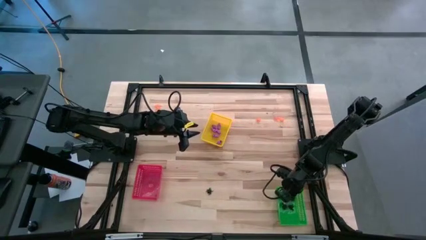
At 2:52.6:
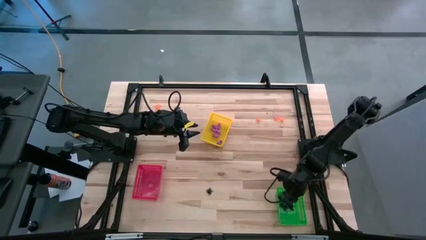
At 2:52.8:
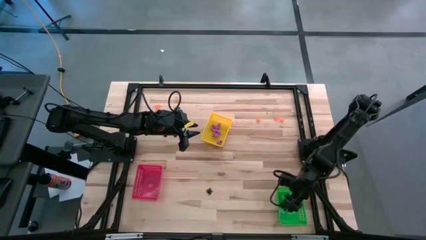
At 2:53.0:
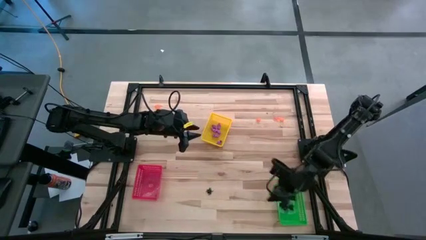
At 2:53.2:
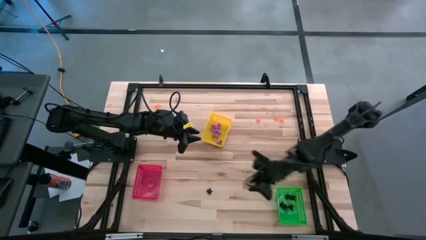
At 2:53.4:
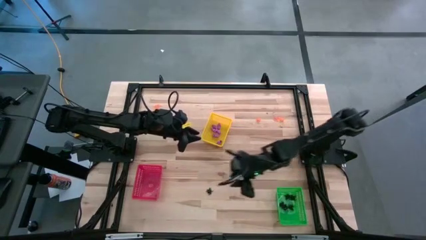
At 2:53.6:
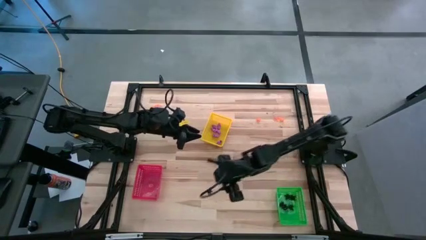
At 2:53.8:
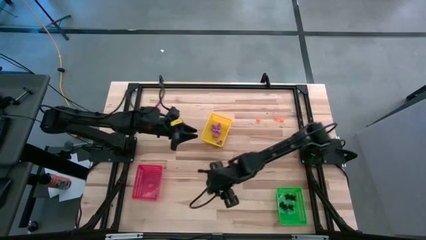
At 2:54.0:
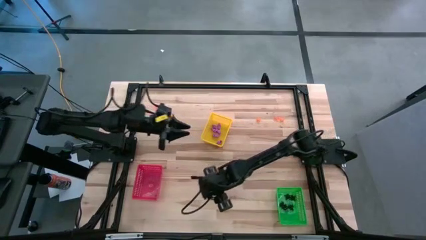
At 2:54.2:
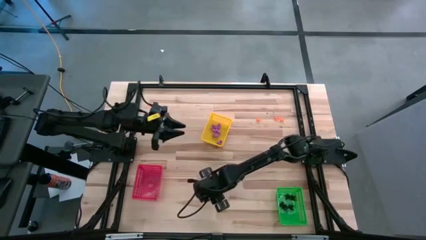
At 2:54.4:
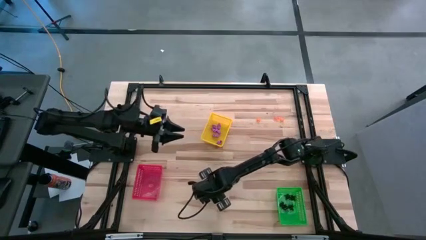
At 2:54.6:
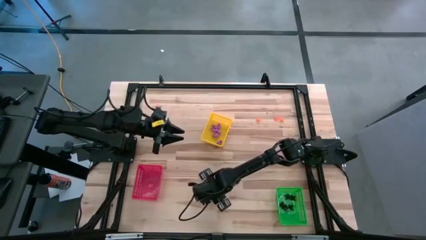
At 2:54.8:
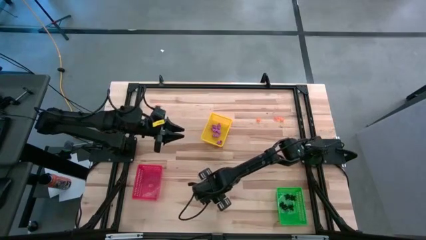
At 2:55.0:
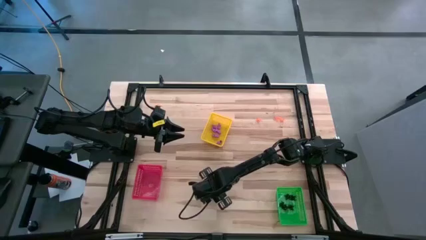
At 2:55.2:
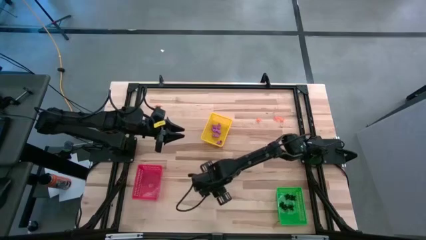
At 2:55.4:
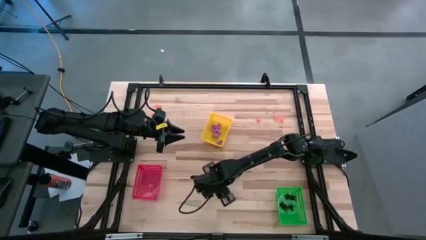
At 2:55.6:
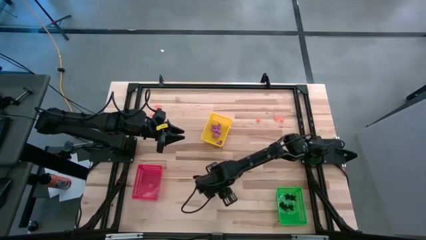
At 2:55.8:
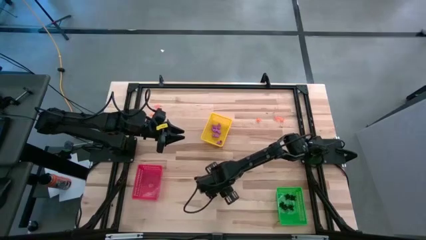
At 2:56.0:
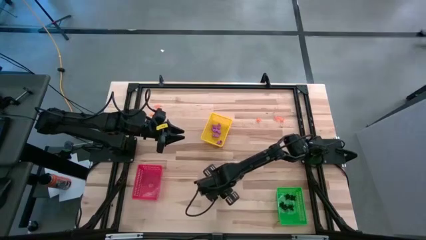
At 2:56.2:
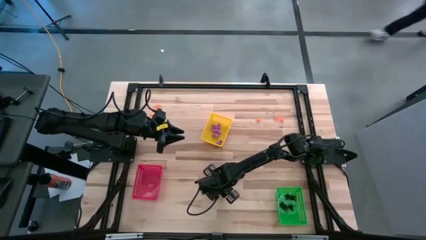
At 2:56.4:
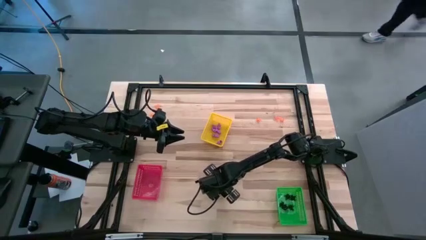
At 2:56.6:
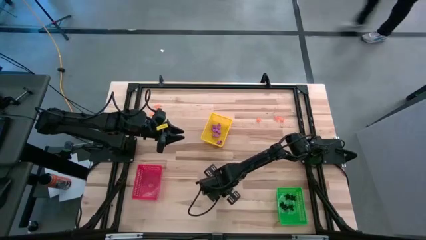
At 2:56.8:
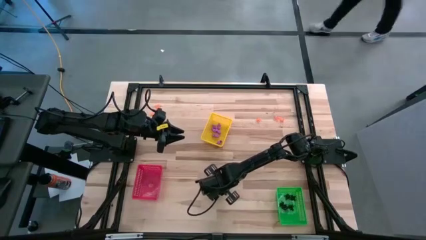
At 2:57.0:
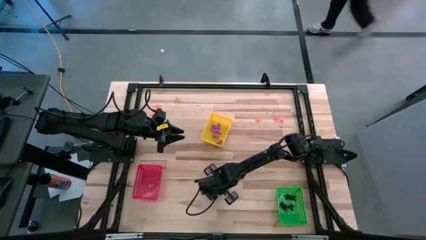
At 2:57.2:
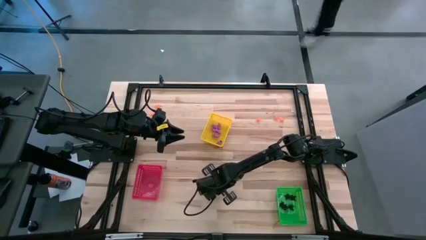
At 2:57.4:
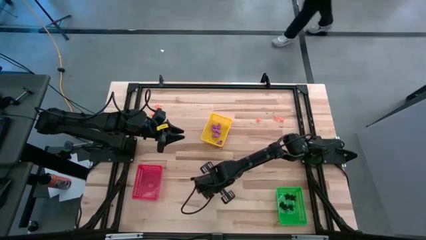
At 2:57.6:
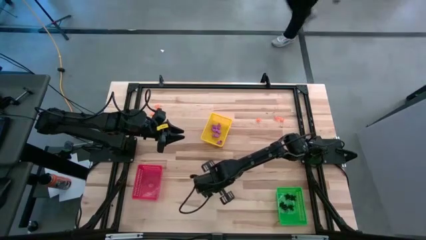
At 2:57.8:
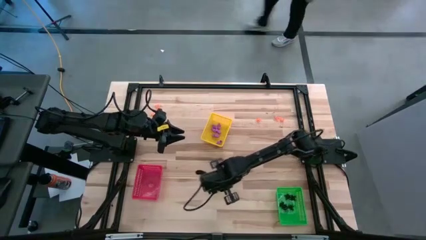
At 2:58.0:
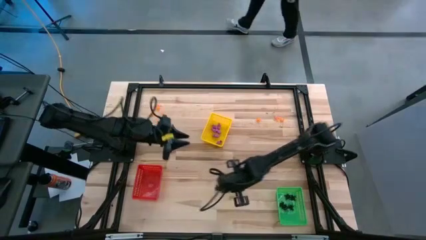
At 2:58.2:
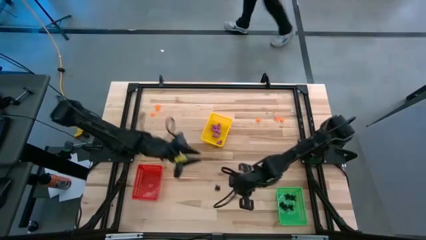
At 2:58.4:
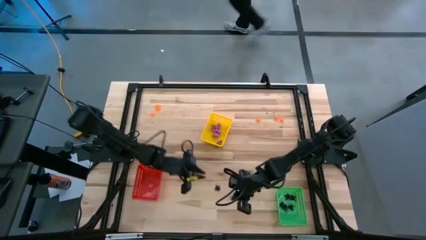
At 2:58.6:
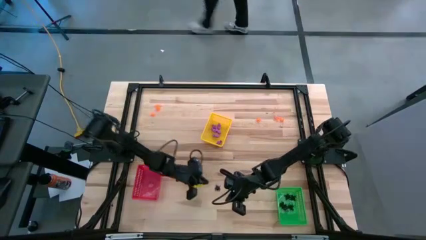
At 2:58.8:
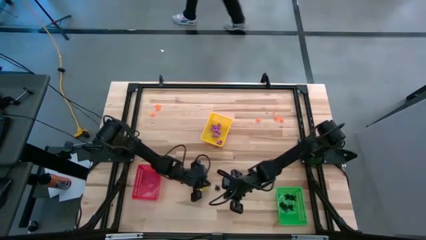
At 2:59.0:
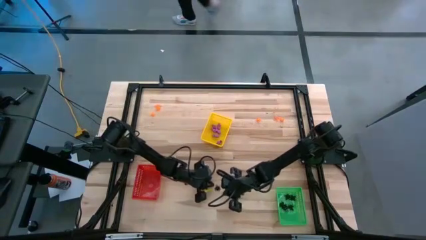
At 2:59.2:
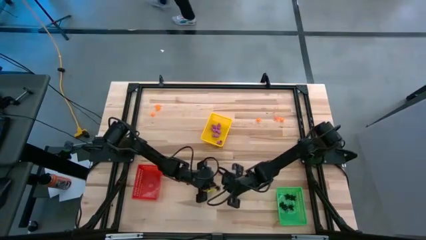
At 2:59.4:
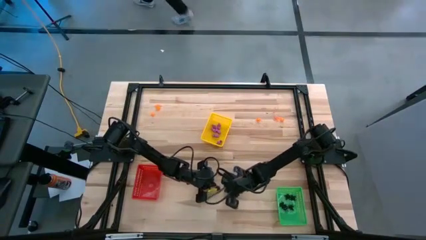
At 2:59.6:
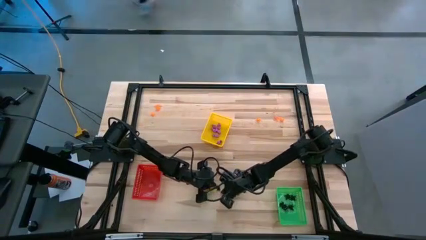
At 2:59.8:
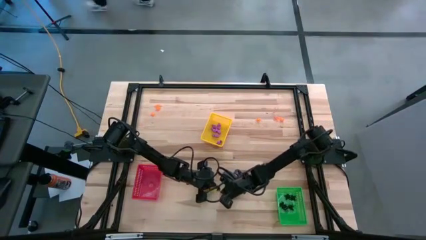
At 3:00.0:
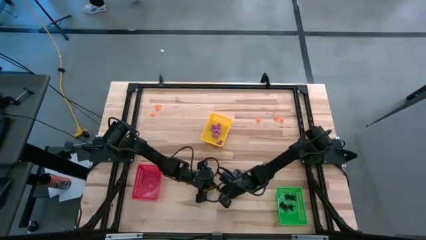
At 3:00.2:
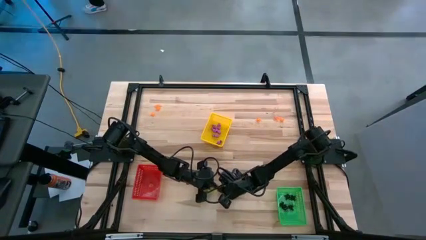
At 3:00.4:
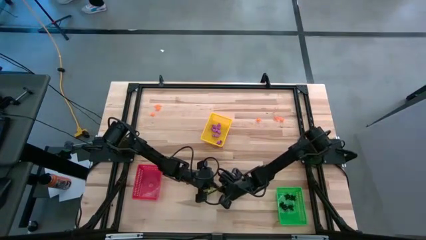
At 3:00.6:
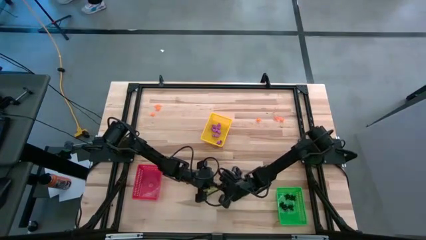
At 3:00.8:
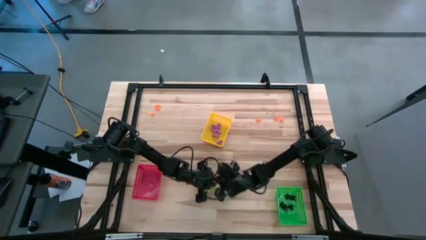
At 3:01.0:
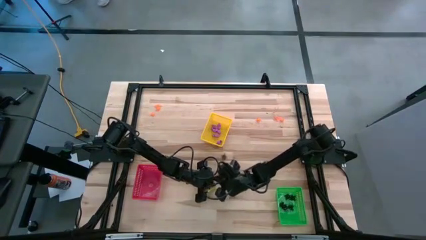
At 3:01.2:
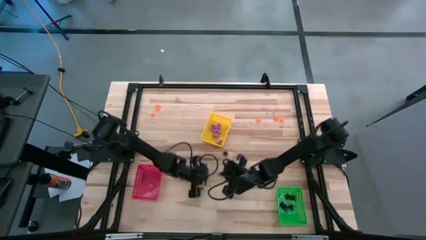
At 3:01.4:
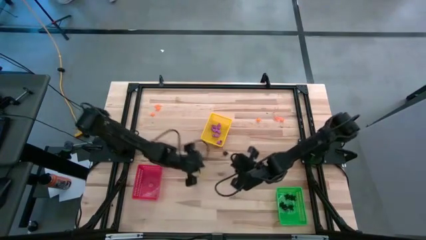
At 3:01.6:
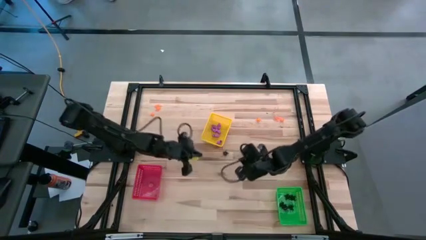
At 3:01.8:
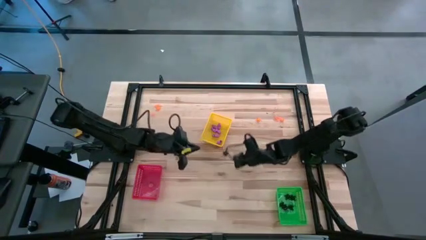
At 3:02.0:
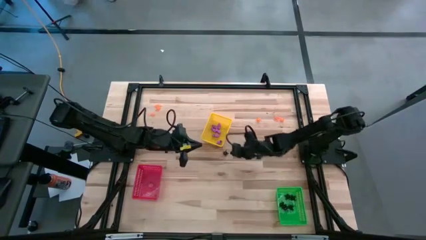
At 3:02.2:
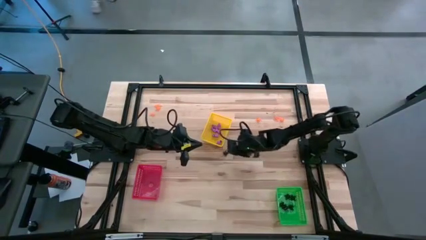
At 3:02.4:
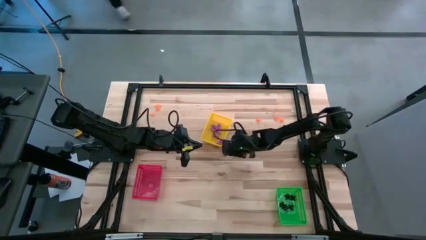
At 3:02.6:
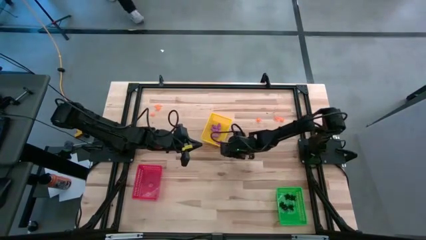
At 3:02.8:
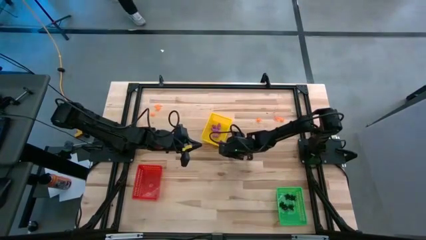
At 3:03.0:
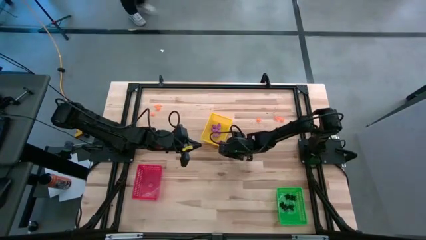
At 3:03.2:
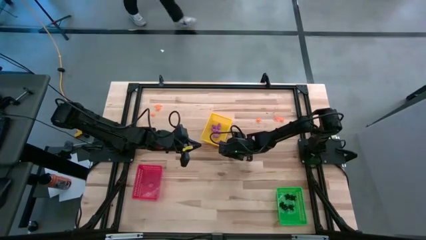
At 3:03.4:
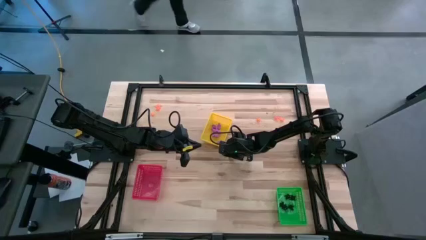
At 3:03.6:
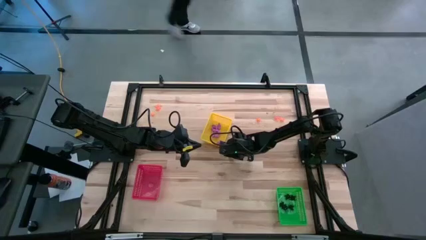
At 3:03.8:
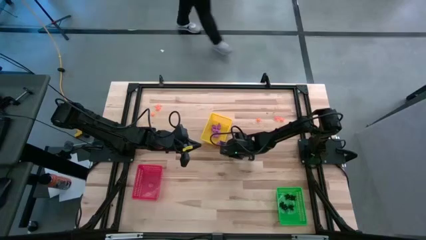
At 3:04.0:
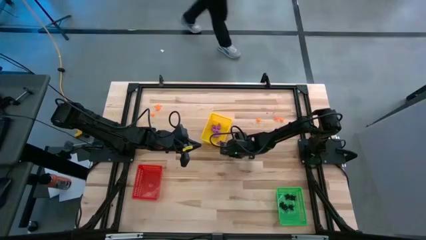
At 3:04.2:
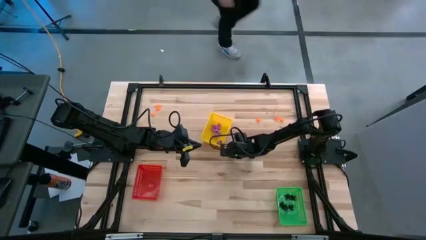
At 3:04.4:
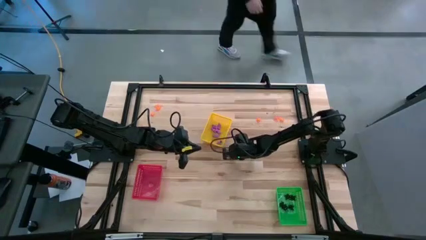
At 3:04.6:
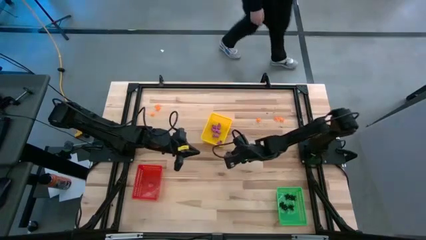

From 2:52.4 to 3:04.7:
Task: Sort Halloween decoration
Put the black spider toy into the green bin

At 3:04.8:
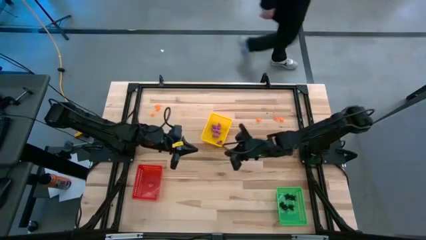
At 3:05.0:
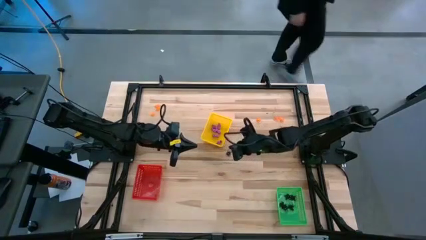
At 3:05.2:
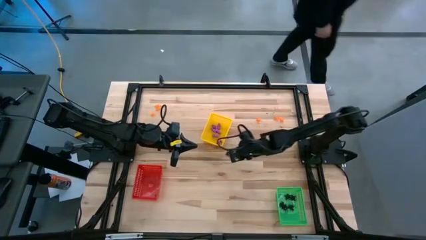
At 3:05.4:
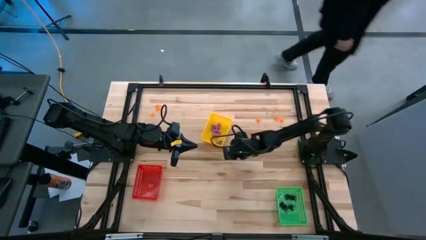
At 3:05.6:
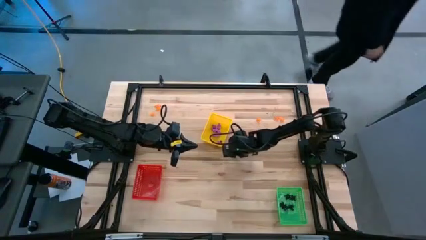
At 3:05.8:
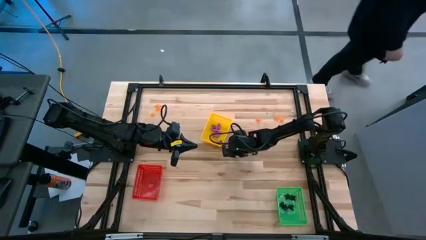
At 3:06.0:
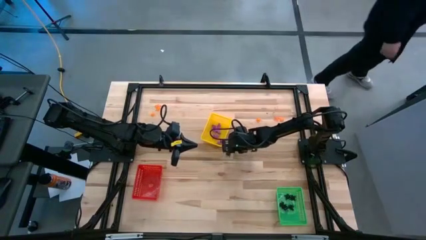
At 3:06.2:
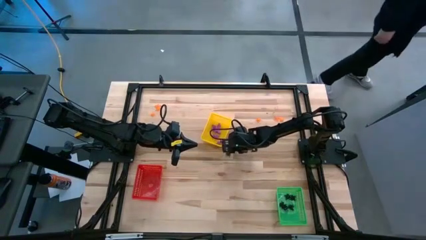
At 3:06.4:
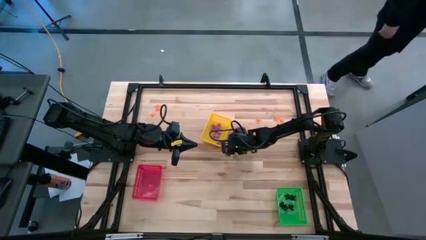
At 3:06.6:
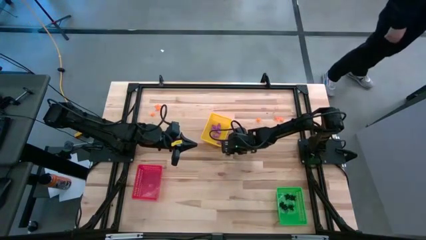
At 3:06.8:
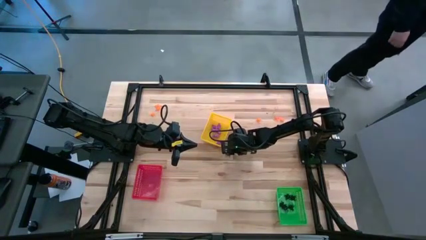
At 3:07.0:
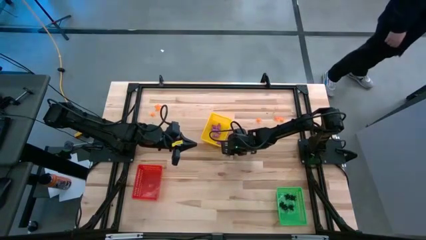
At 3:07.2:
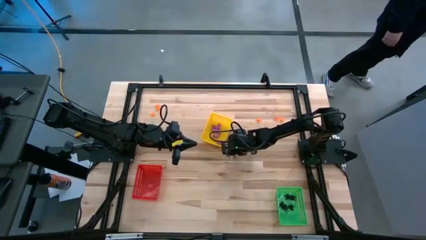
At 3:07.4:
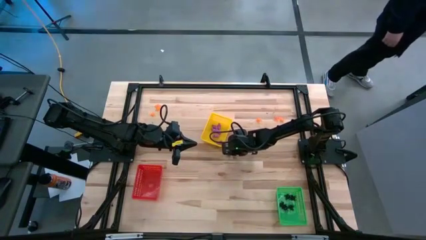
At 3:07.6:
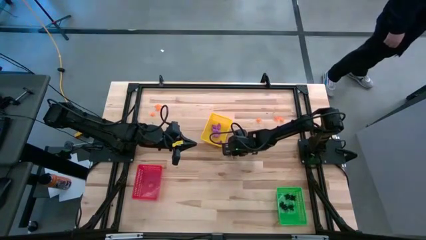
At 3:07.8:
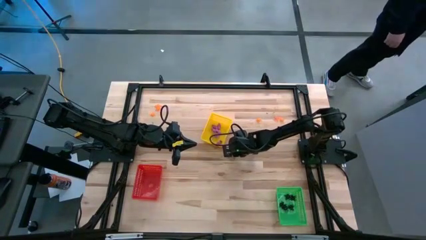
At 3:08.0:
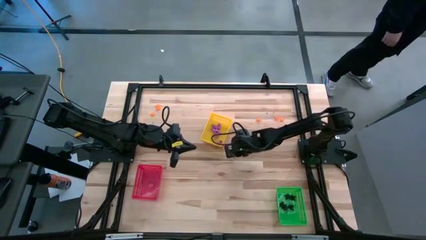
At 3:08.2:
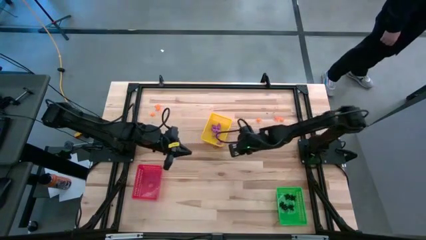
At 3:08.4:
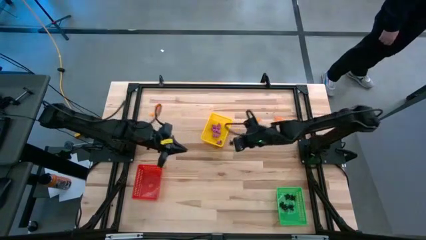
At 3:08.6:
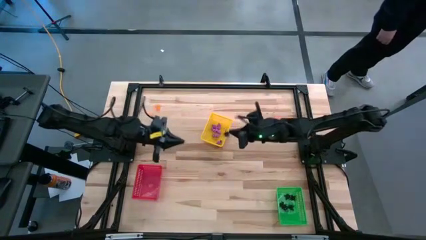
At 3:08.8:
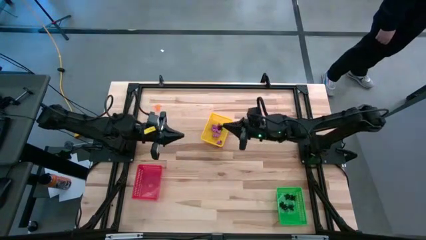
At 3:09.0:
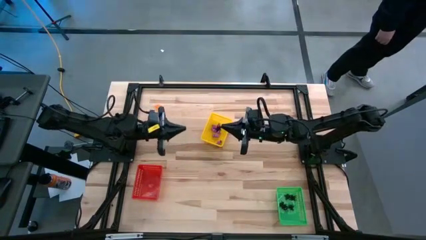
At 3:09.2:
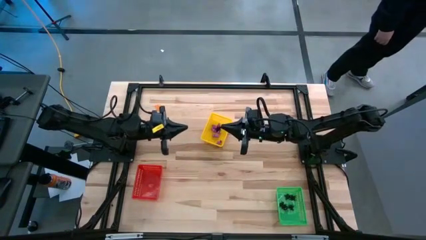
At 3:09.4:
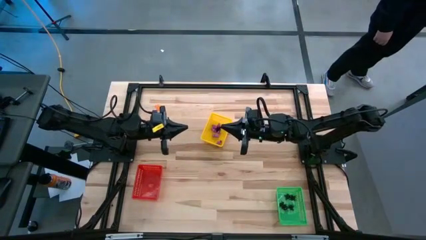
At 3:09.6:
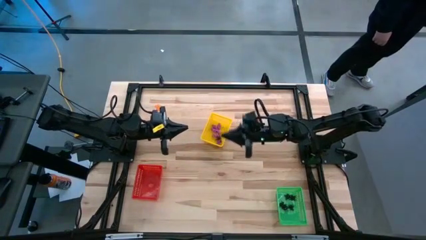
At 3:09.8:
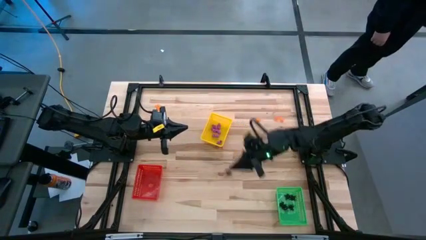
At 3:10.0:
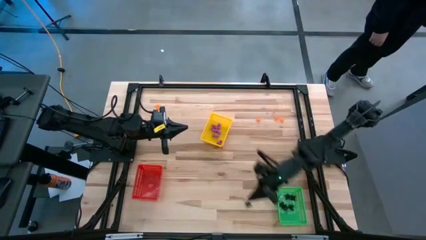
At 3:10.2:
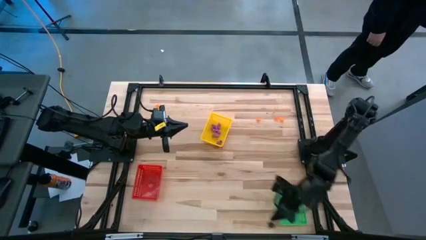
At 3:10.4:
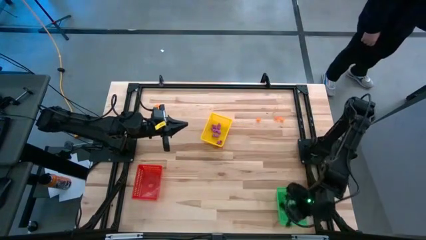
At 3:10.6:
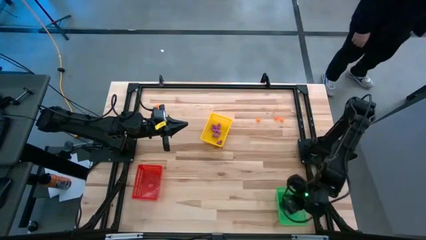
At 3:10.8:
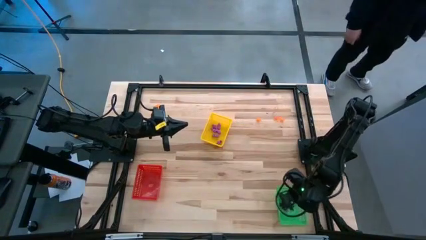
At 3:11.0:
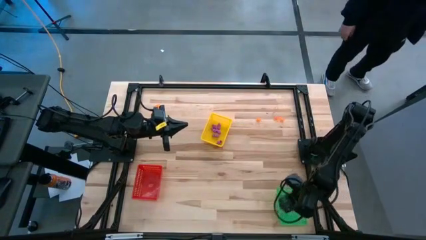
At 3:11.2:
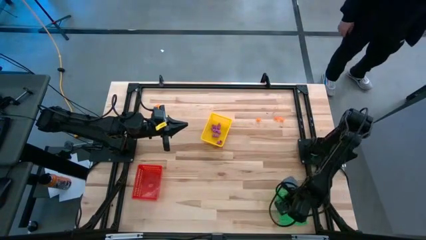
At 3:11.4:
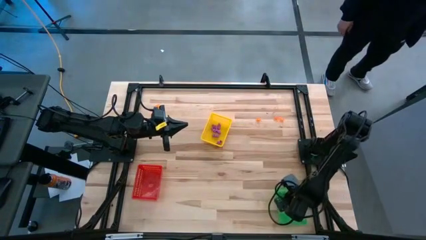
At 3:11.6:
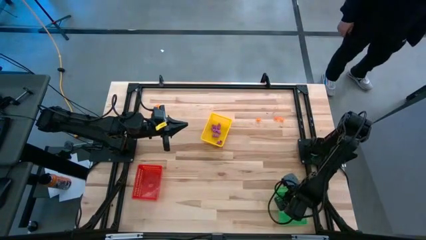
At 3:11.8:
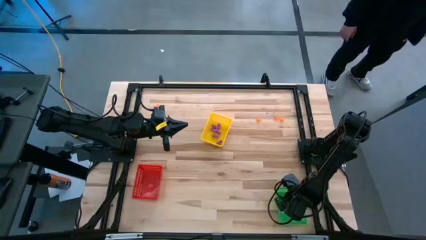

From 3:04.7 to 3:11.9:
Put the black spider toy into the green bin
